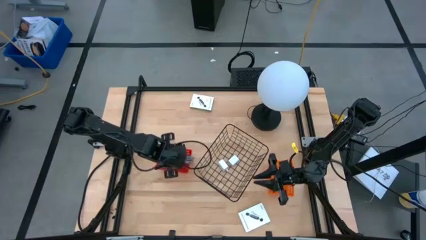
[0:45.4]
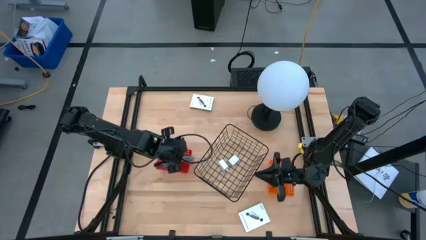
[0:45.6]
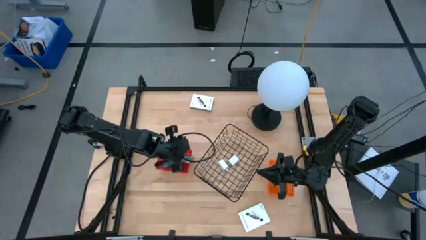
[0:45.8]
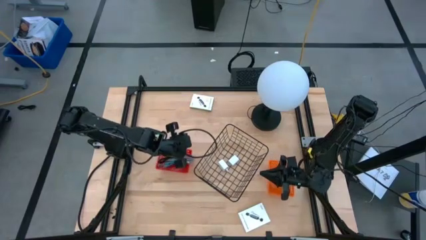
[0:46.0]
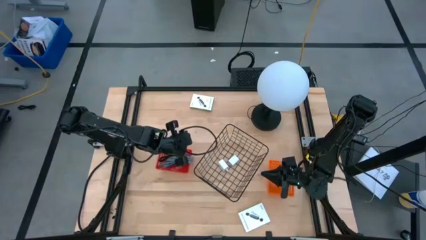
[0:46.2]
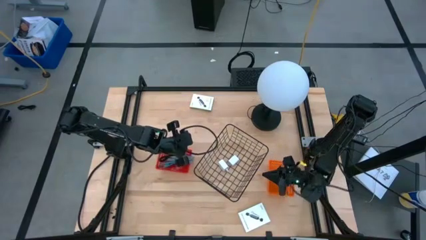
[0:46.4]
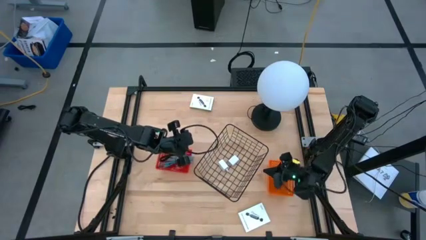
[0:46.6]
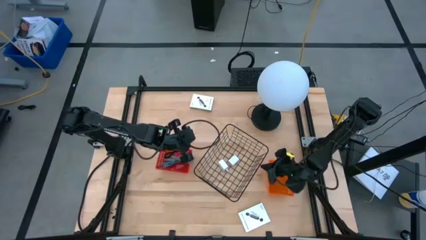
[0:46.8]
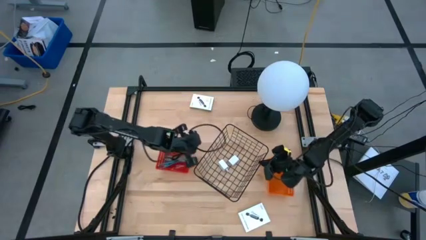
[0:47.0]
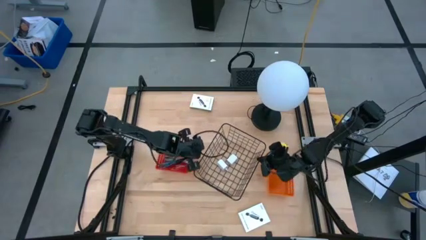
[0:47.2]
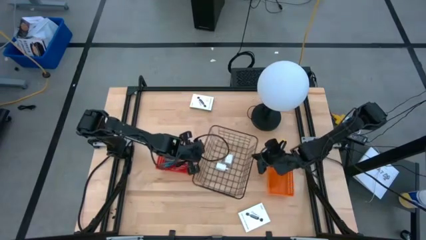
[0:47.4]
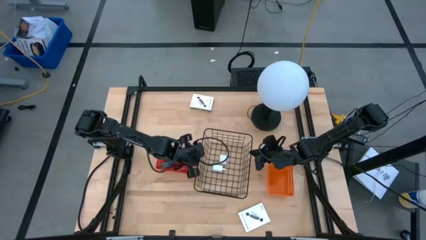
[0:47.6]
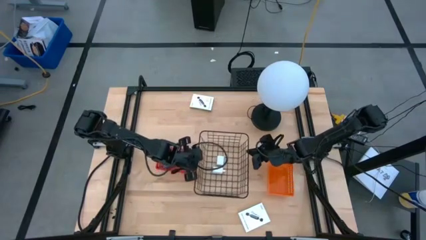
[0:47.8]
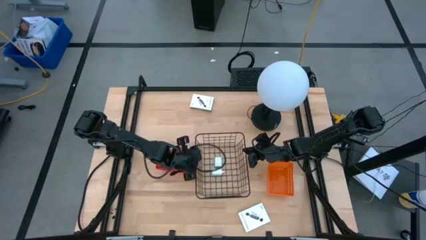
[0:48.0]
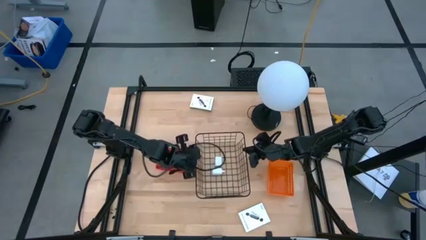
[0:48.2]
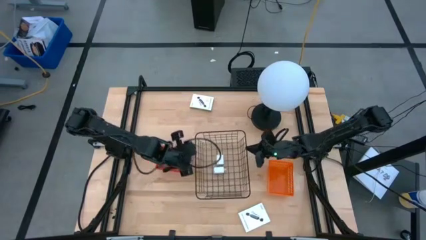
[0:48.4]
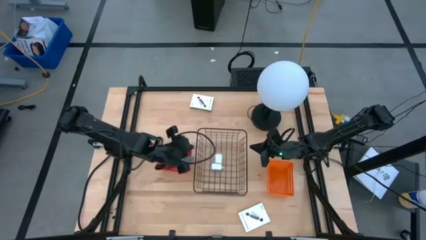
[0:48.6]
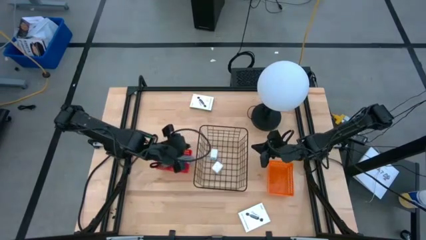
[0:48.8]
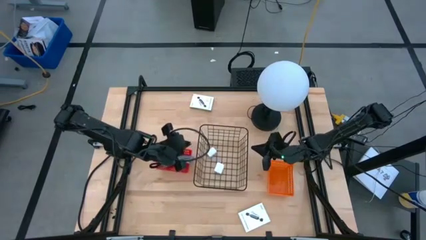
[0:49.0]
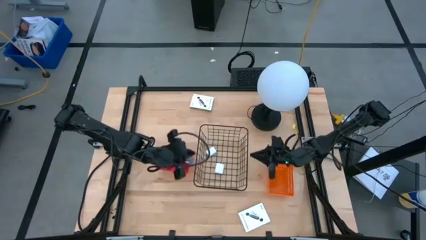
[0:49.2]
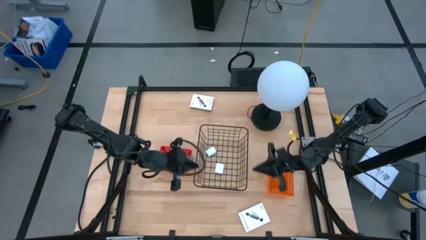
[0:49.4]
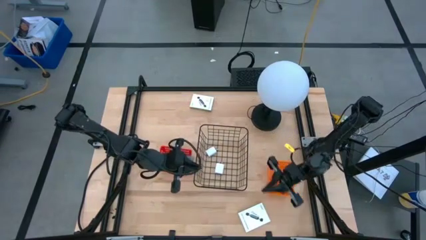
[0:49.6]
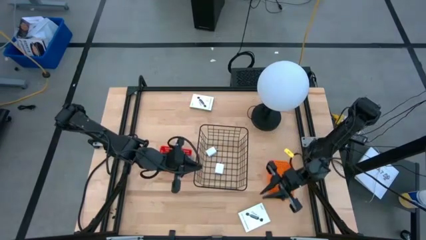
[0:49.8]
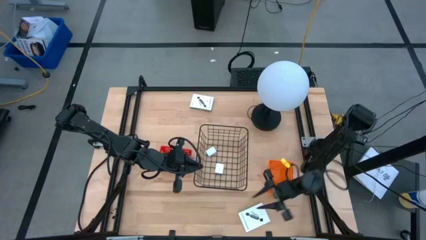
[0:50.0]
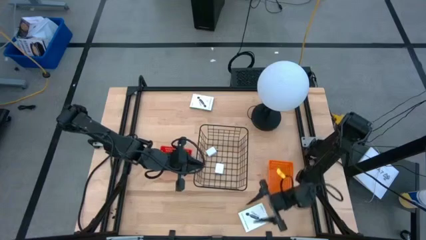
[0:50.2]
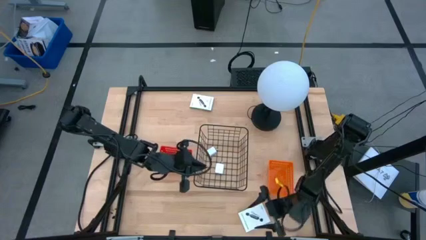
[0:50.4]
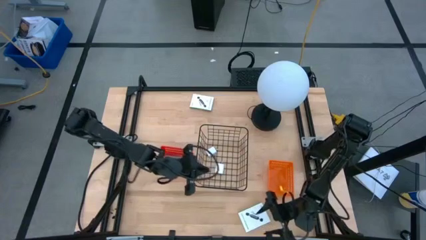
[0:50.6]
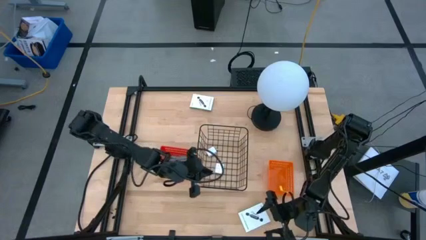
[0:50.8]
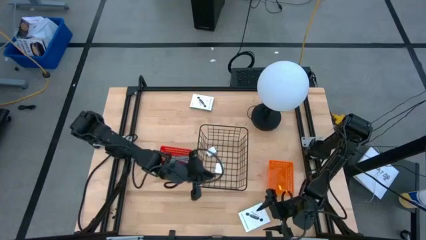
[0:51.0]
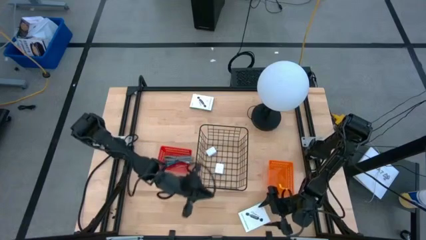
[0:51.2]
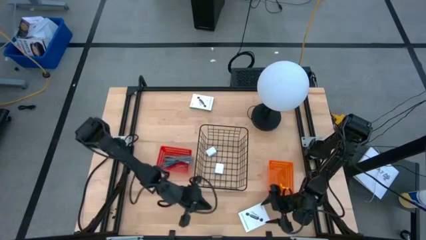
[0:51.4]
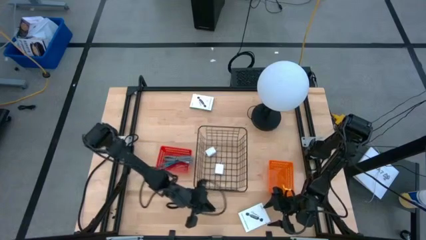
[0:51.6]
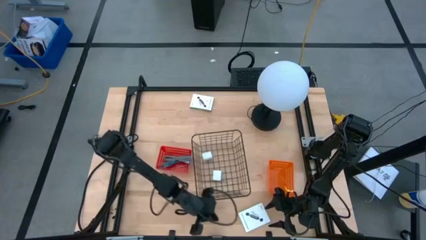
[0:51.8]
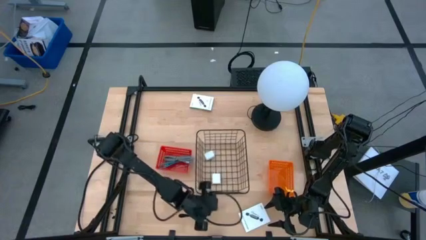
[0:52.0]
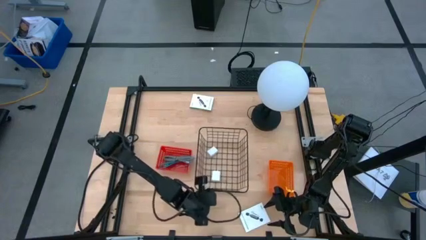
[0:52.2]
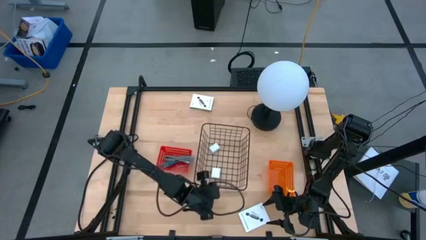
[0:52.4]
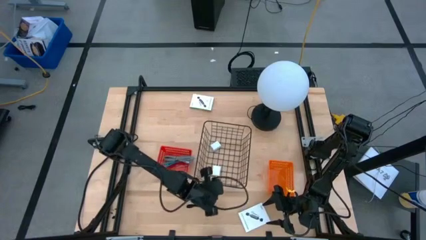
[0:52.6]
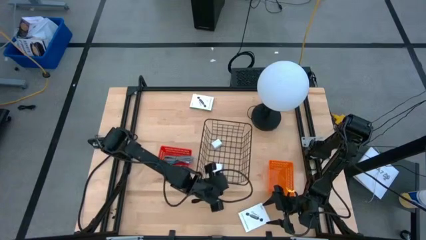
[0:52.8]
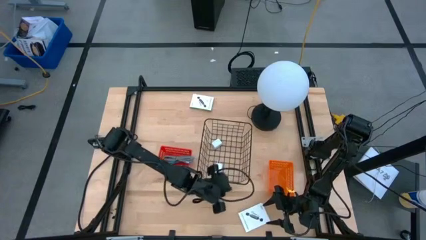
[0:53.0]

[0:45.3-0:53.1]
Task: Pick and place items into bin
Adjust the black wire basket

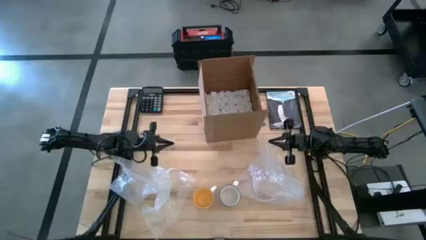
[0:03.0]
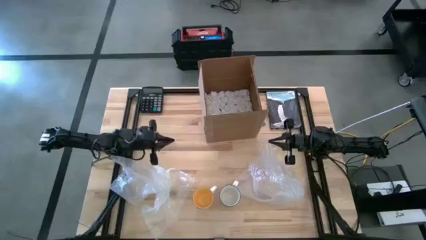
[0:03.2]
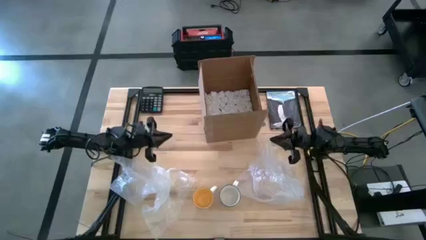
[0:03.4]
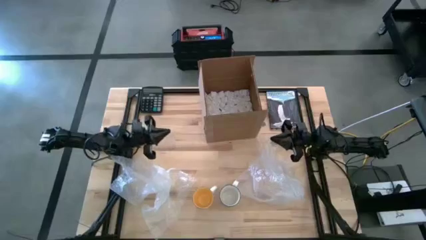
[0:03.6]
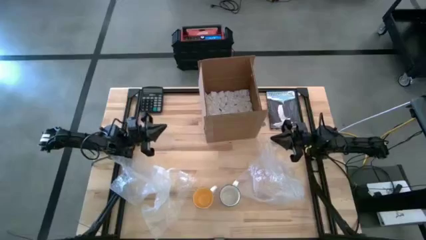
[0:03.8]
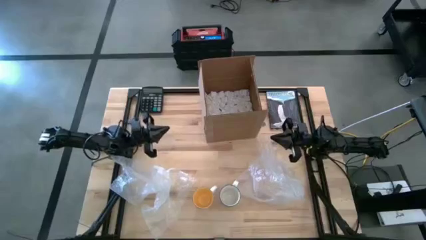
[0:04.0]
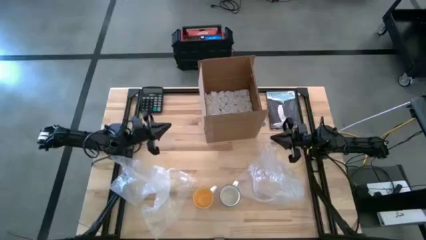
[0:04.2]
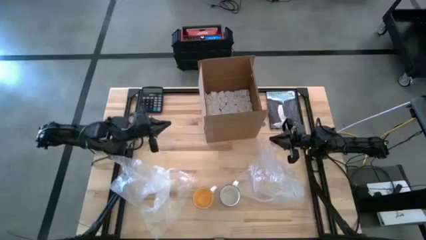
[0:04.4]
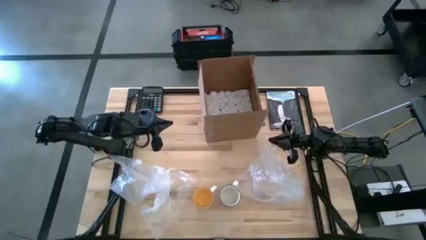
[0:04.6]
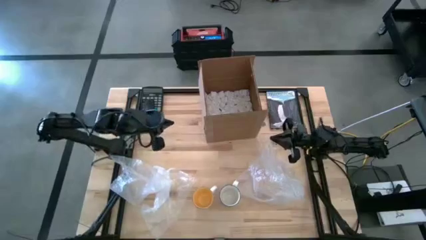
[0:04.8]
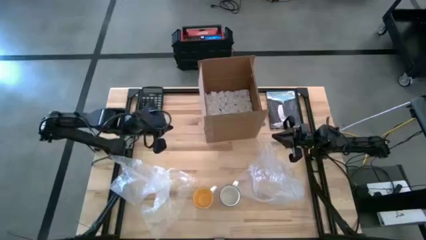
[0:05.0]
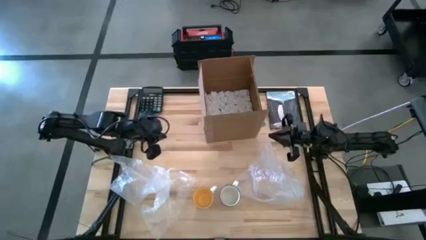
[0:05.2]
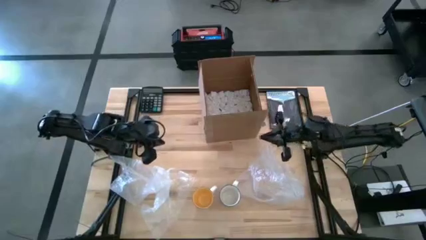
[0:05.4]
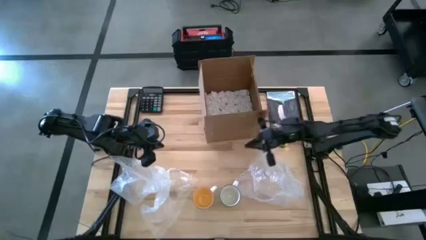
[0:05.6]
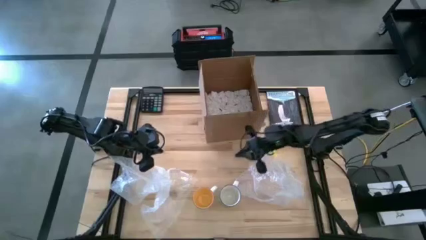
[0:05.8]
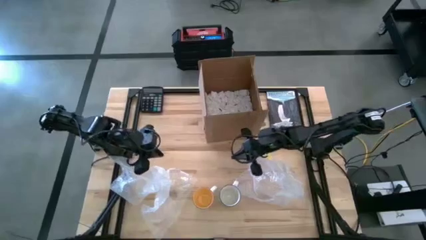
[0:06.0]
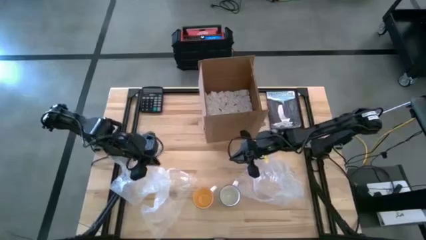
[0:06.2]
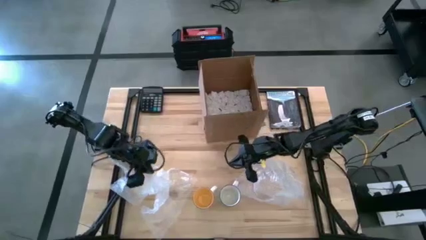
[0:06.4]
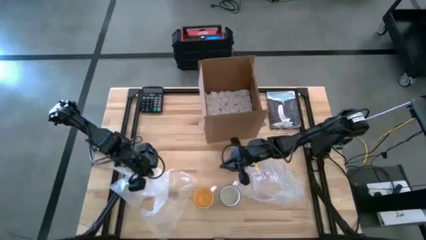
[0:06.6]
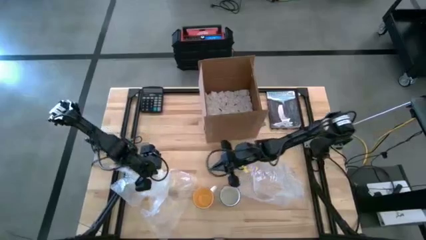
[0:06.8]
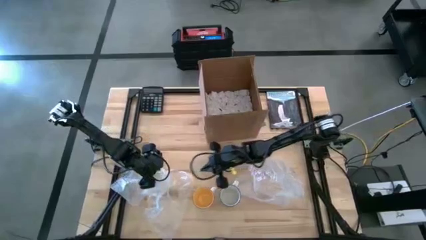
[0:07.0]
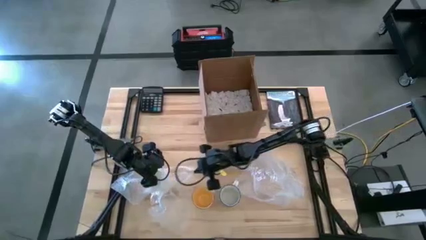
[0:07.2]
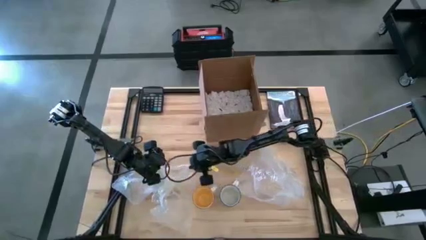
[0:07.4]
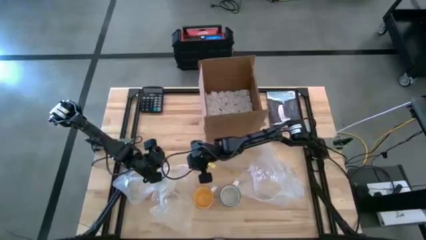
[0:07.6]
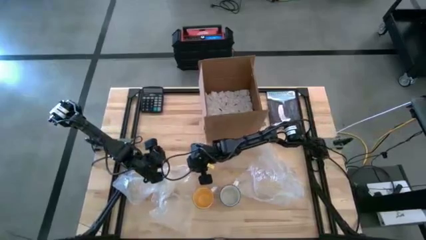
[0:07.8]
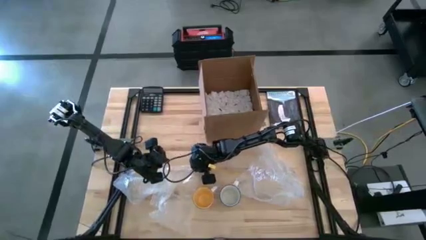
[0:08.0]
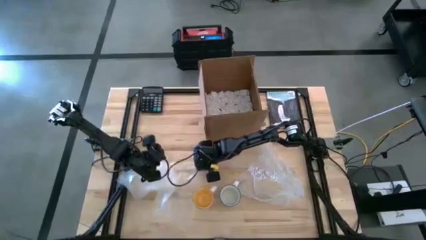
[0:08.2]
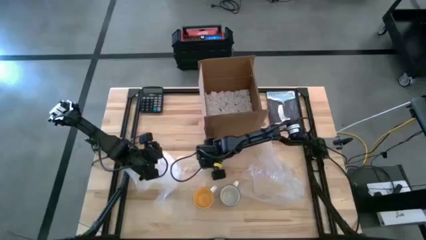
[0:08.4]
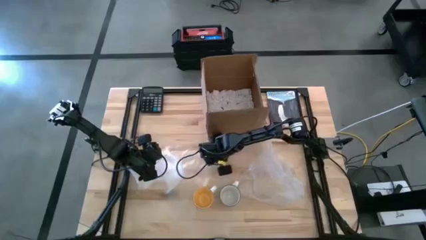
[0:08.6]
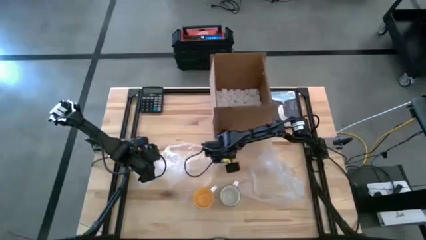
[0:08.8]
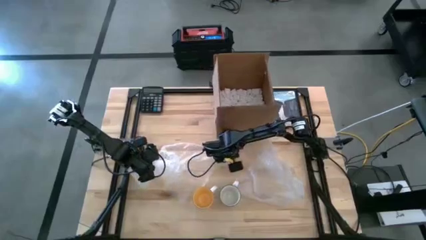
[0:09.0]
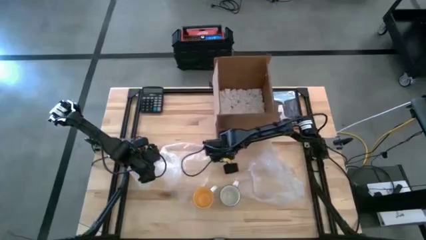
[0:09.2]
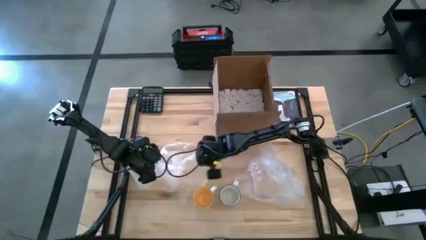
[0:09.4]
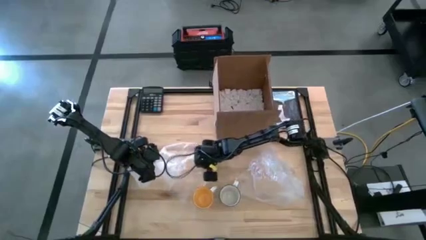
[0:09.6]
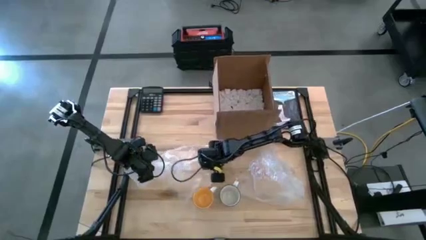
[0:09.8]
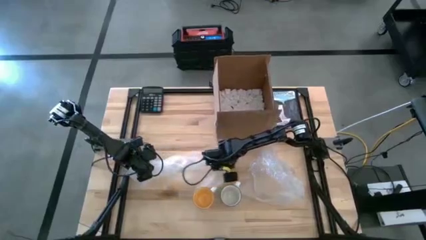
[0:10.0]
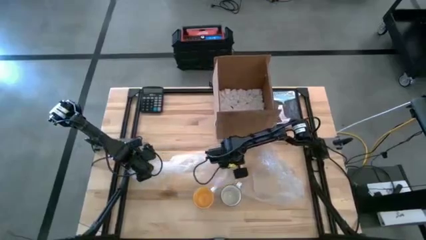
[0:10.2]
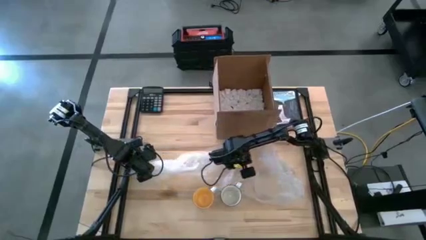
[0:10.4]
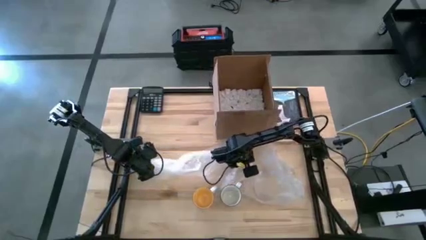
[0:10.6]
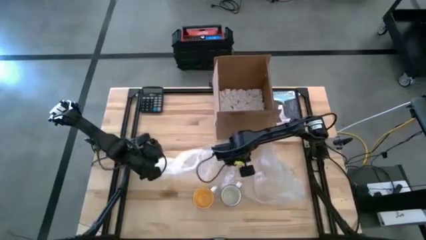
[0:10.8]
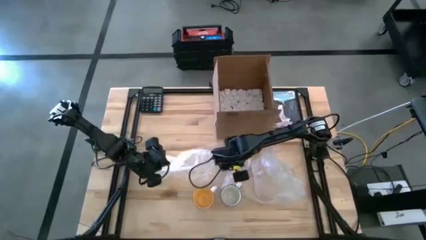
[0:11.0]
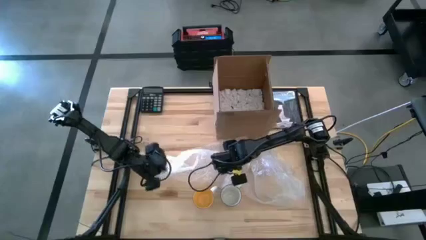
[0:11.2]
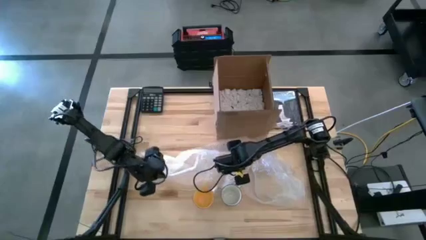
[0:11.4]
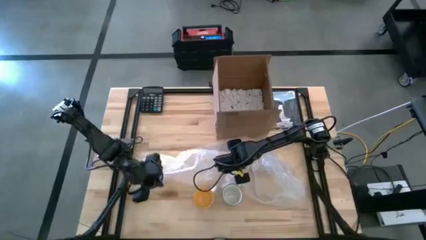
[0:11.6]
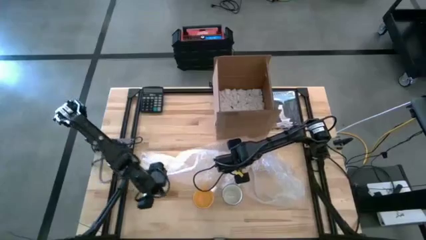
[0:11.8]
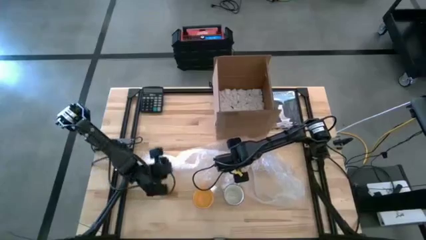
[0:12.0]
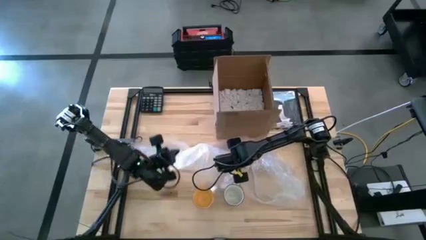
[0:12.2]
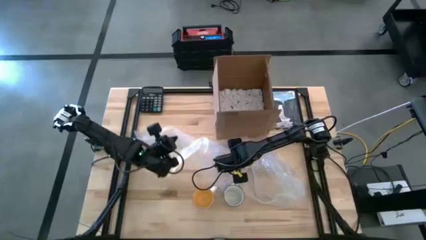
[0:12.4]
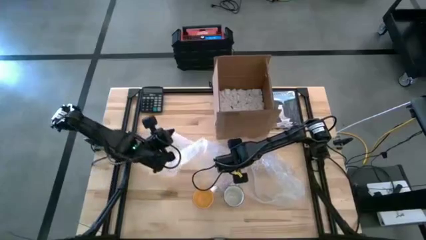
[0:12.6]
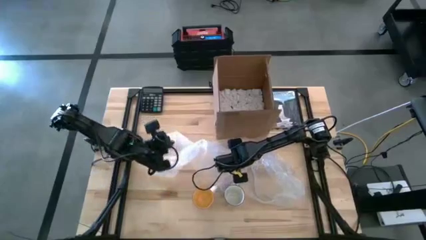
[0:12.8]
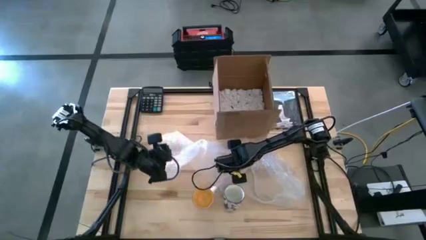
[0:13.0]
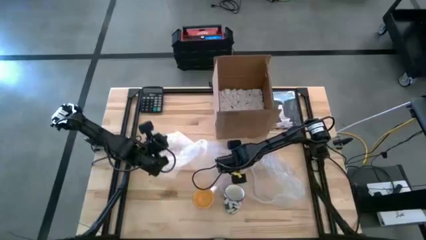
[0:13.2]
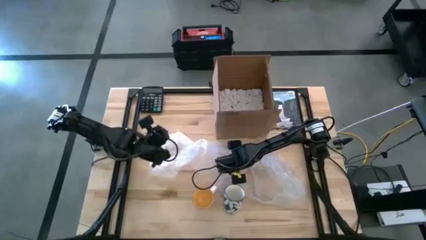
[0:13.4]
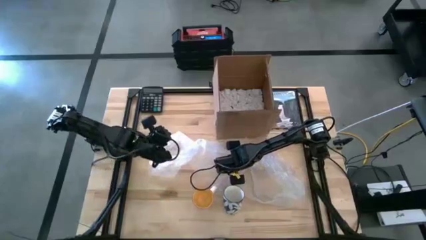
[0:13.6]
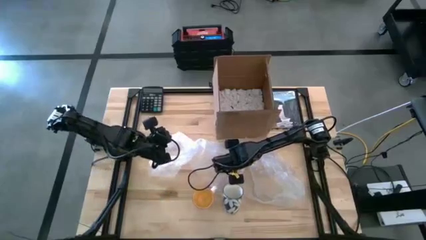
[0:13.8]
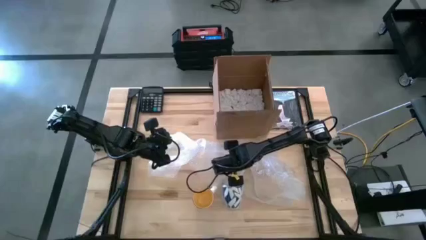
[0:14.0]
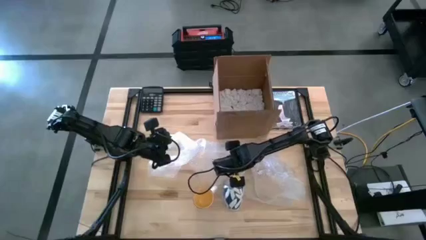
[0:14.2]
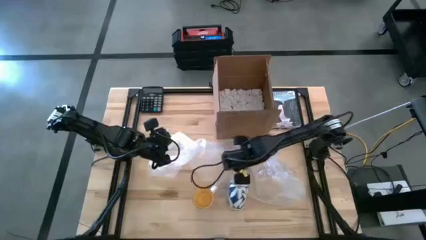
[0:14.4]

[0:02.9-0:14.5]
Task: wrap mug
Prepare the left transparent bubble wrap
